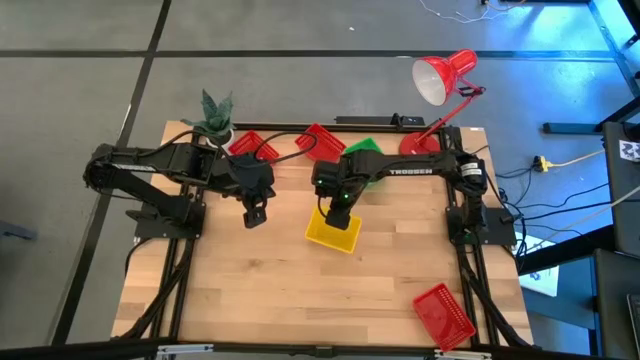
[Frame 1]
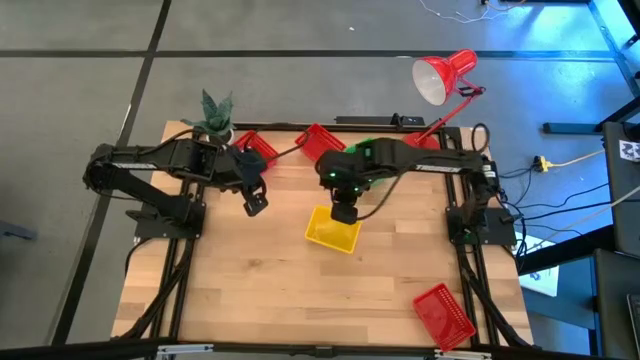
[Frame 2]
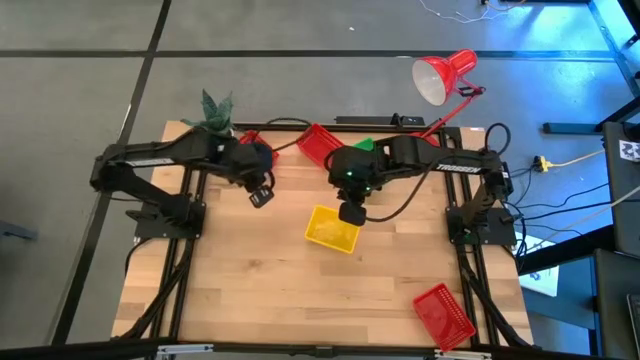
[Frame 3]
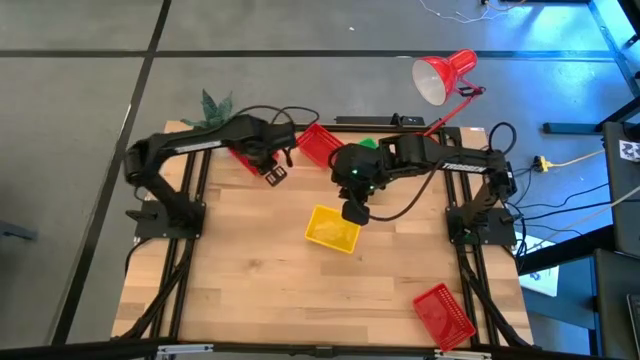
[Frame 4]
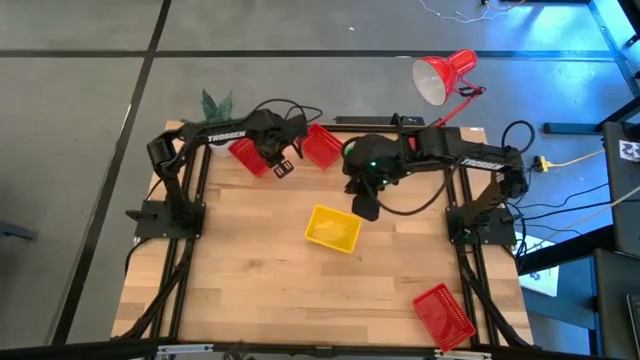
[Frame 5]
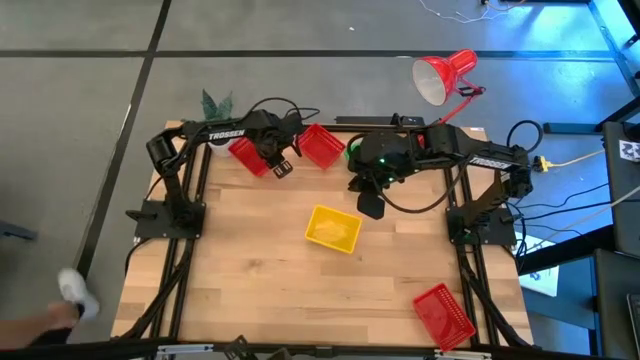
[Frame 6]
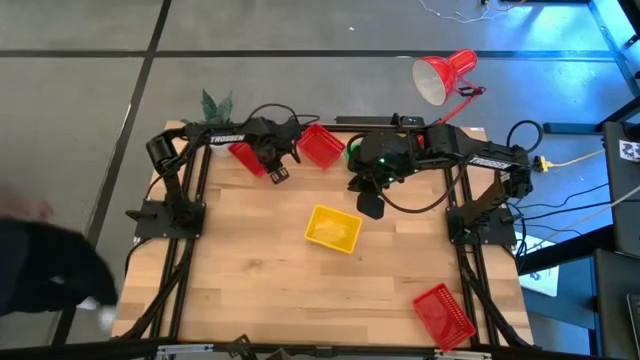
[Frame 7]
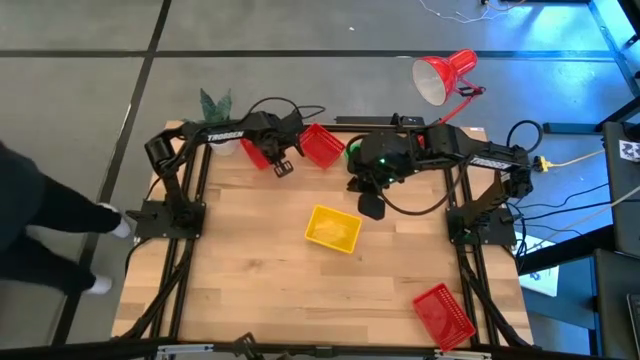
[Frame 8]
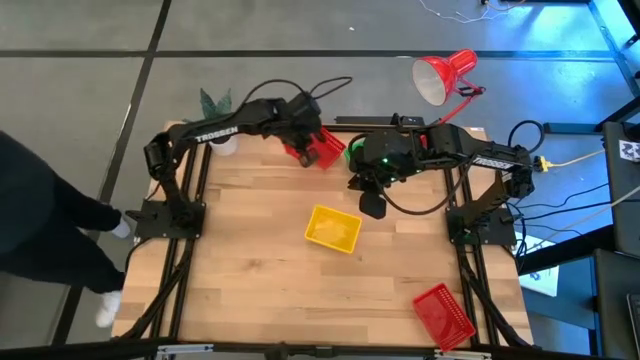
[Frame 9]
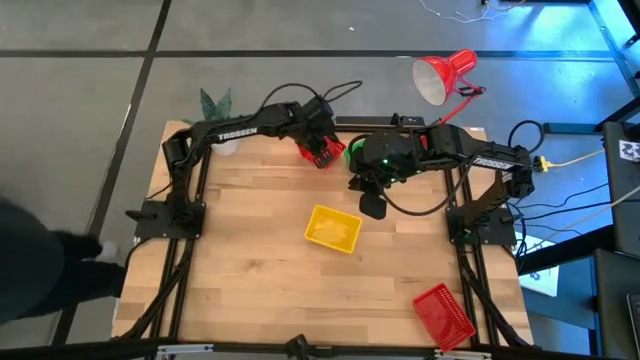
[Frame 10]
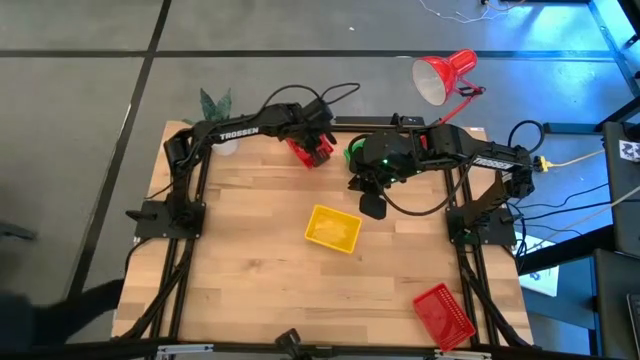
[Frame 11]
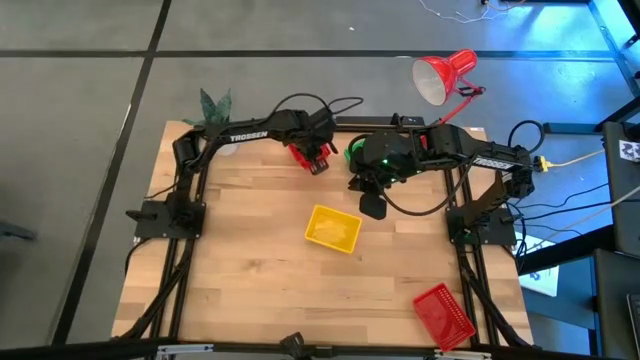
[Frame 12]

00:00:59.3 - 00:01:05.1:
Stack the top left red bin on the top right red bin

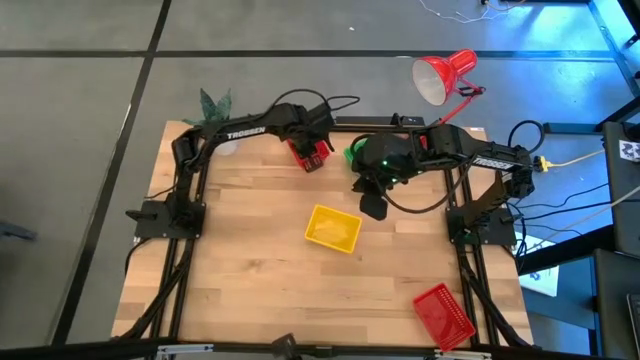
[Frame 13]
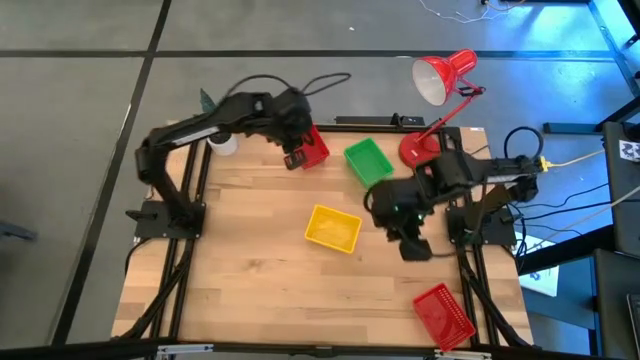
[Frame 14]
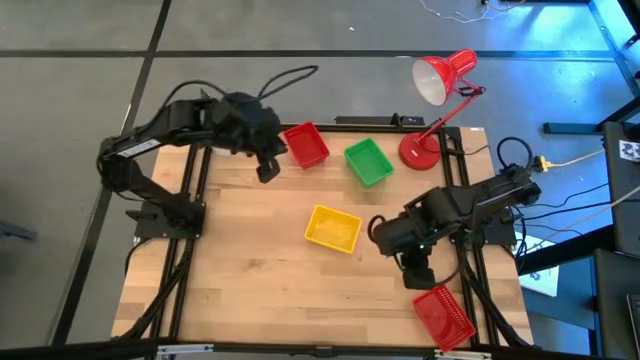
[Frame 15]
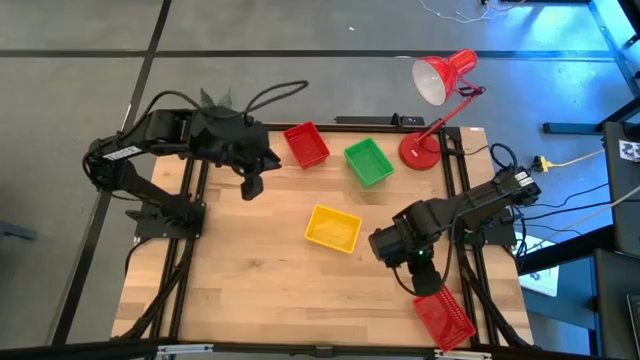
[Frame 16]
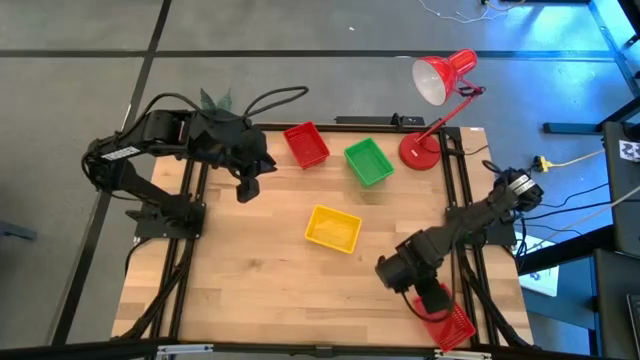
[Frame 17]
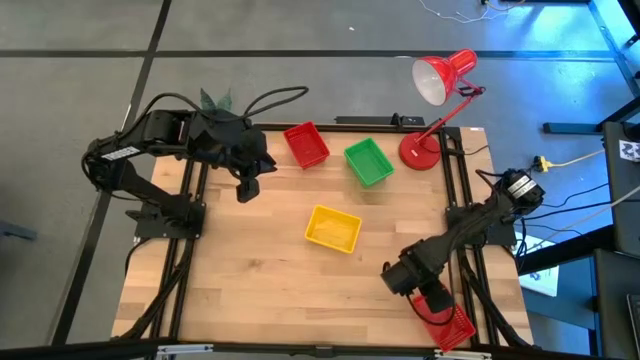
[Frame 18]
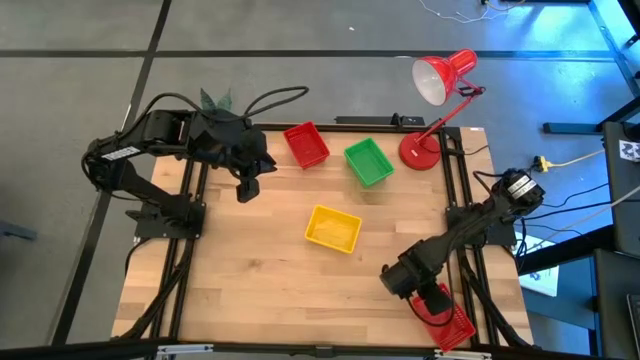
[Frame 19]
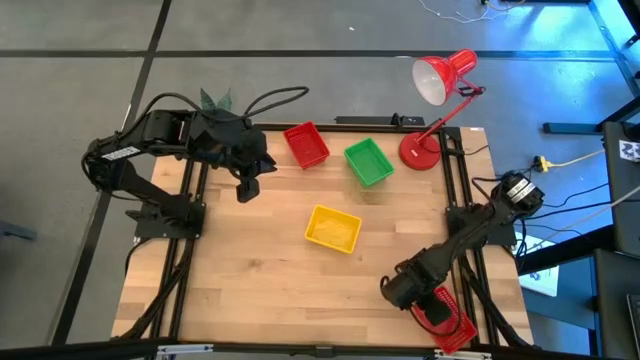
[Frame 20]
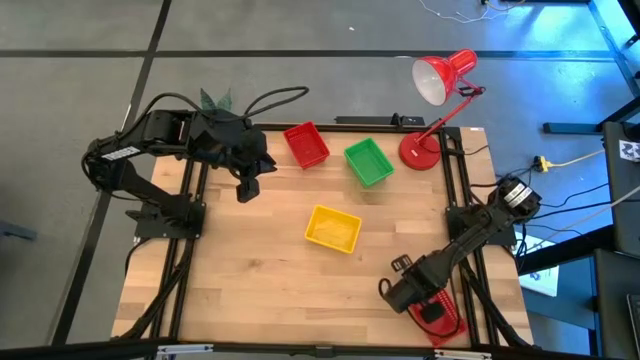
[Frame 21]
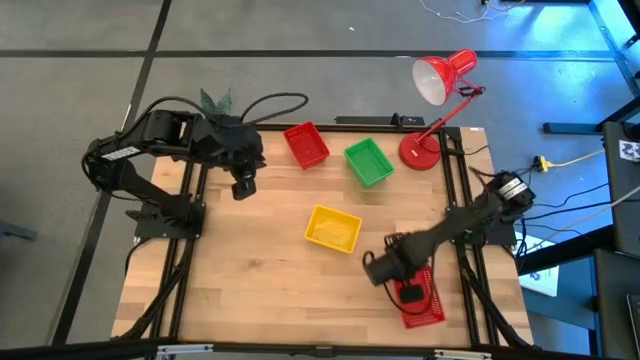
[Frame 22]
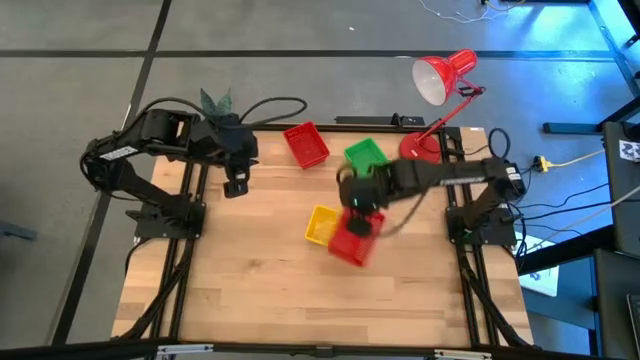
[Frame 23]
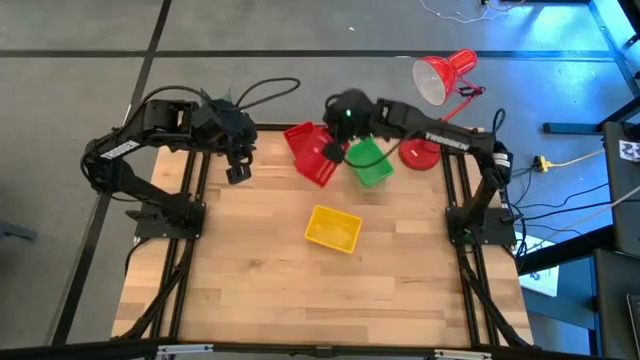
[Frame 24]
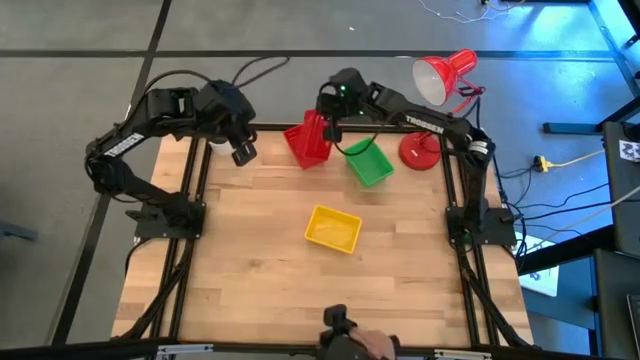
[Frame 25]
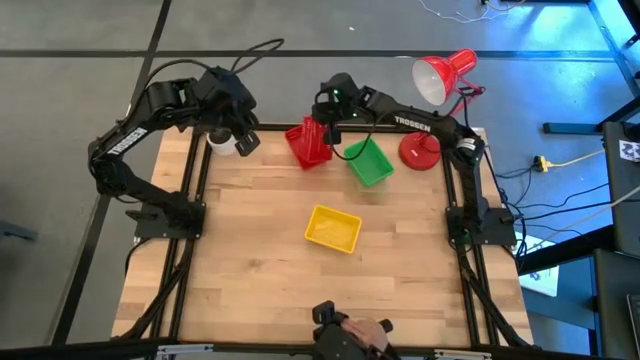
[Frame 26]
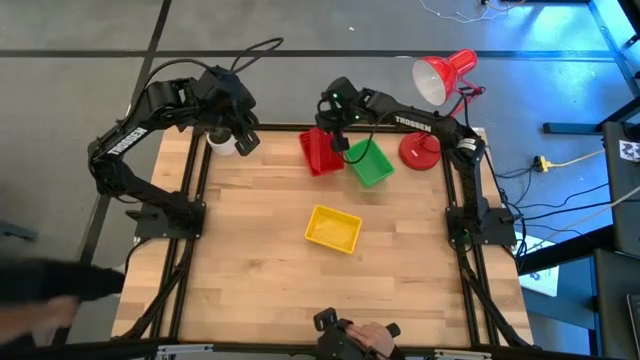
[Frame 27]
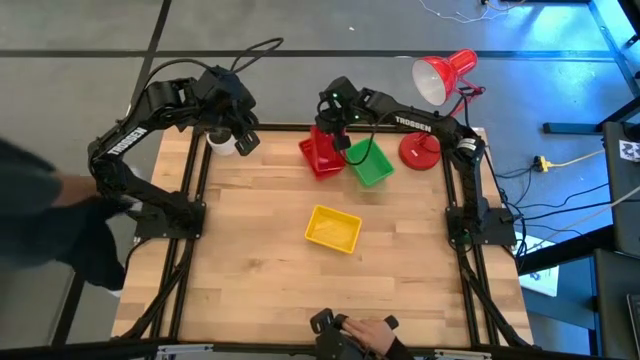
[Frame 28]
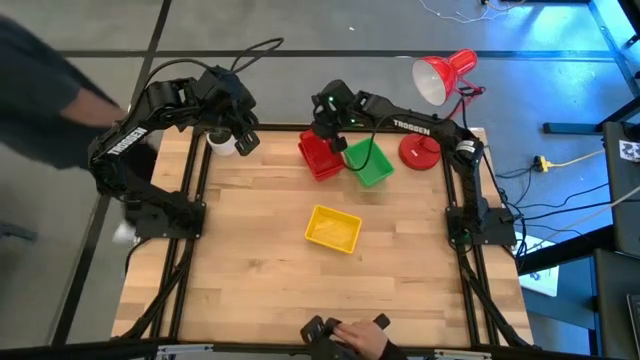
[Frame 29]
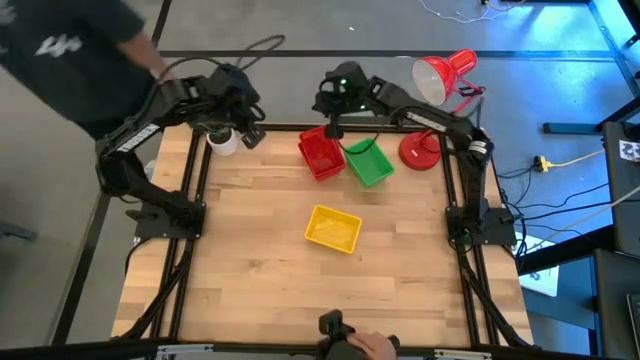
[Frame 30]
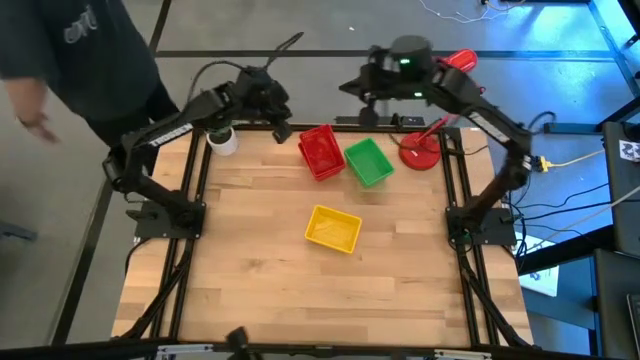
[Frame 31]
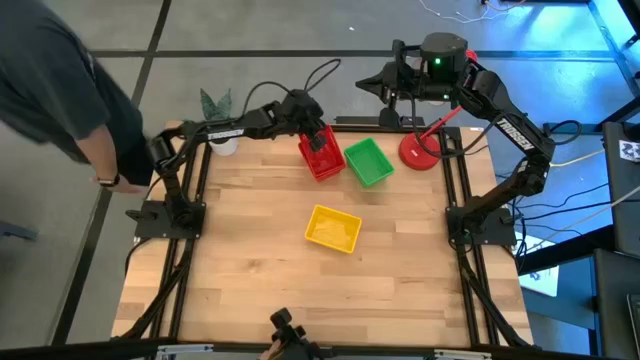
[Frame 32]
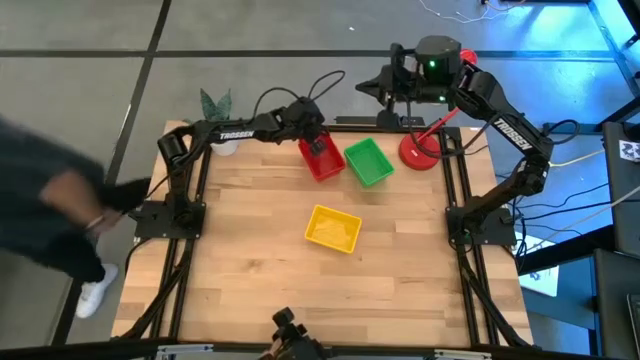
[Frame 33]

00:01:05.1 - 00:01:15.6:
Stack the bottom red bin on the top red bin

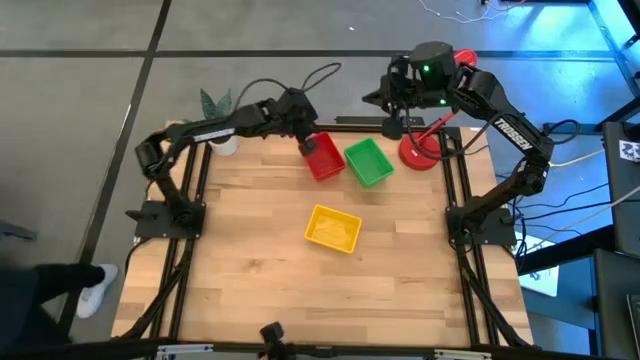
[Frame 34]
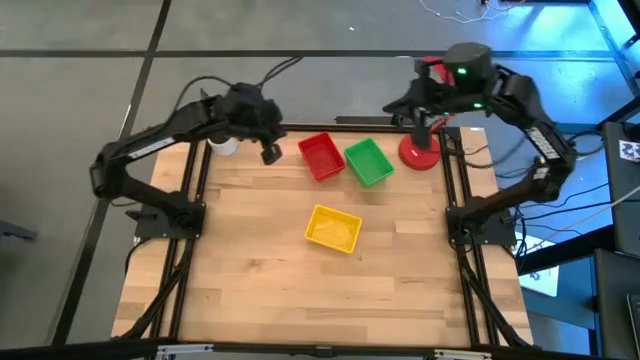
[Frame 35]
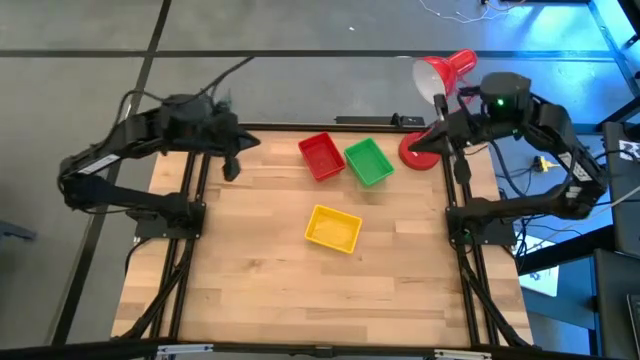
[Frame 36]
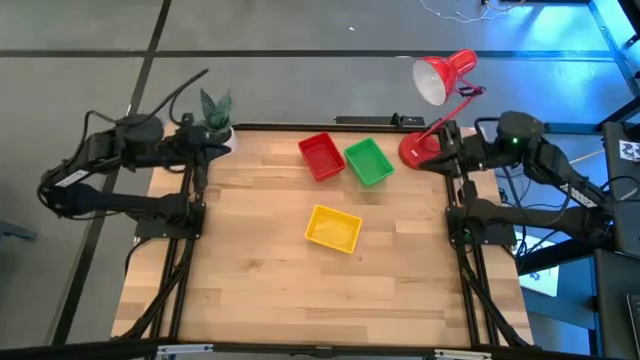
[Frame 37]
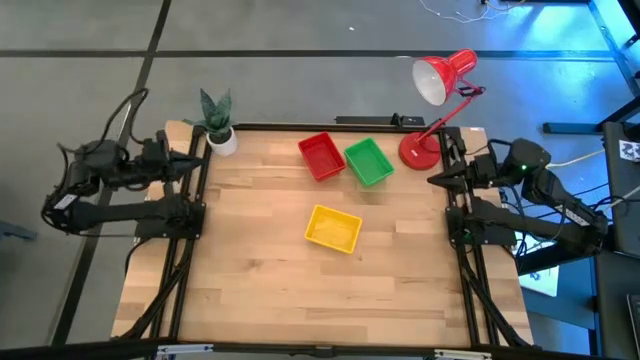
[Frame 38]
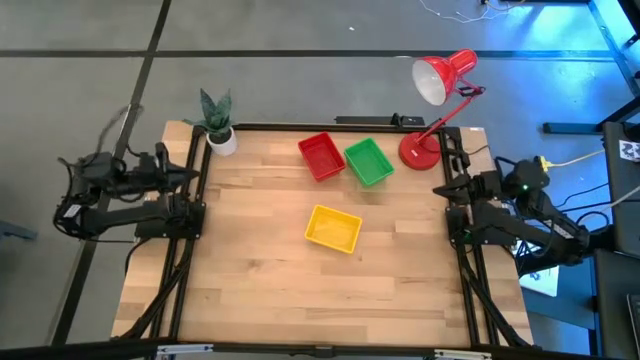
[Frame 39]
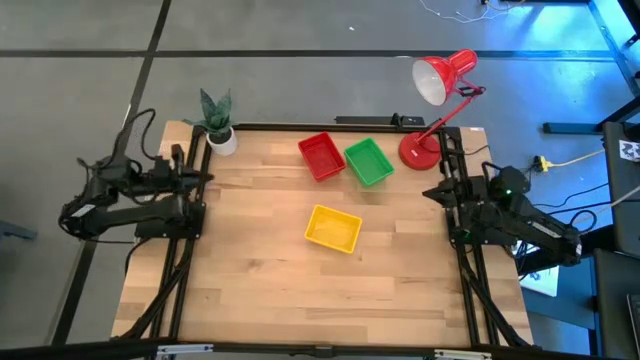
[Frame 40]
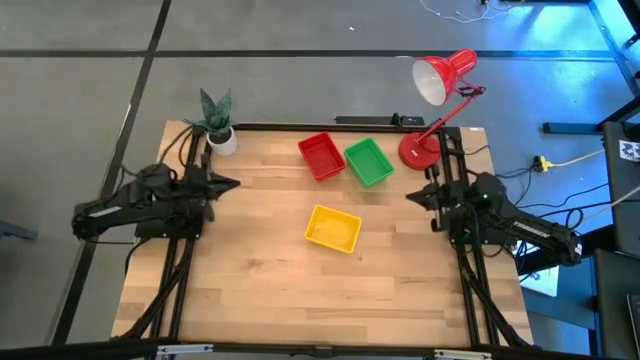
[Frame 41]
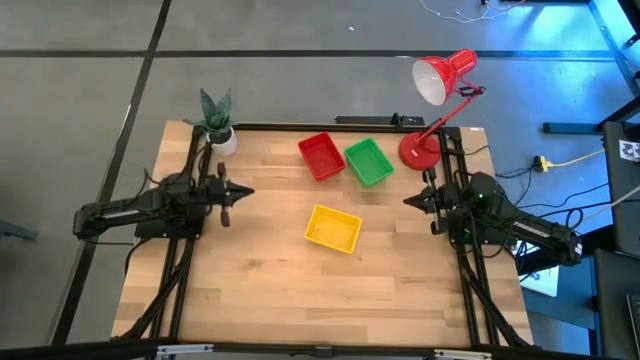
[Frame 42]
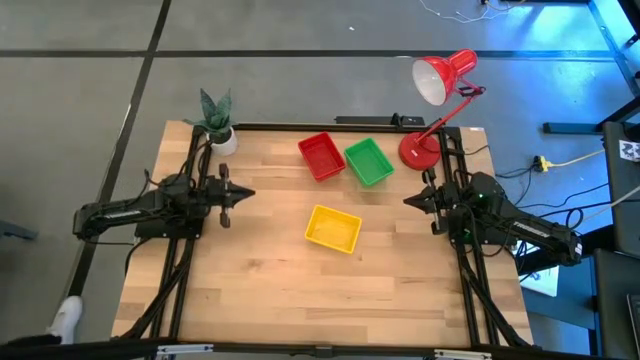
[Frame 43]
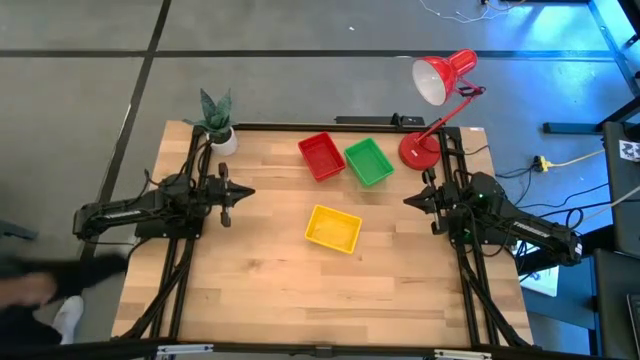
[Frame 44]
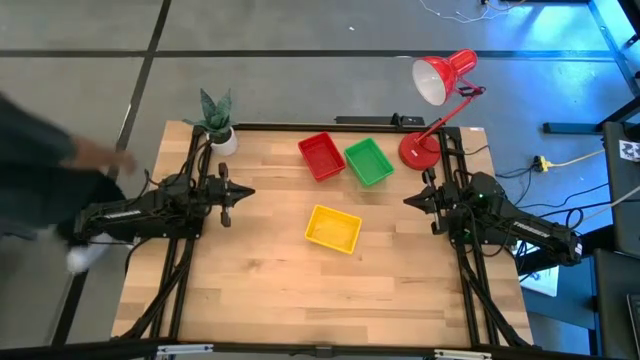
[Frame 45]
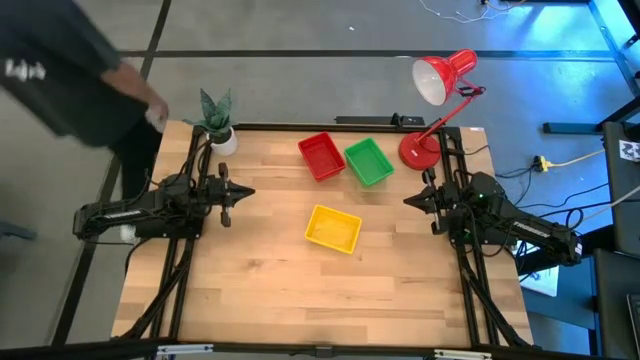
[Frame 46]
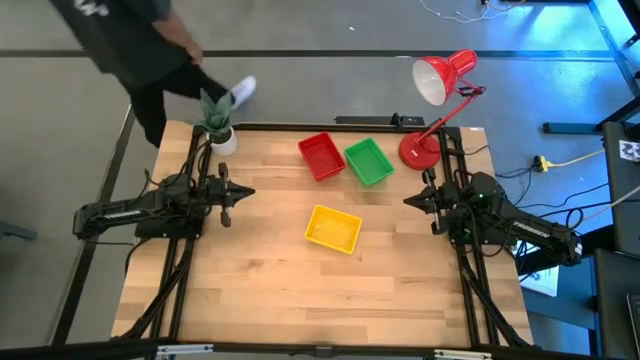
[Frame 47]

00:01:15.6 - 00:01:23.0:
Return to Home Position
